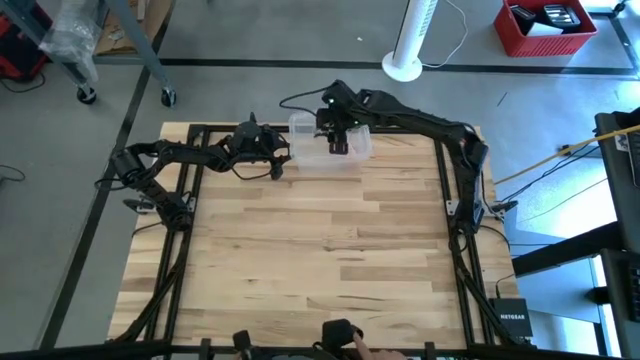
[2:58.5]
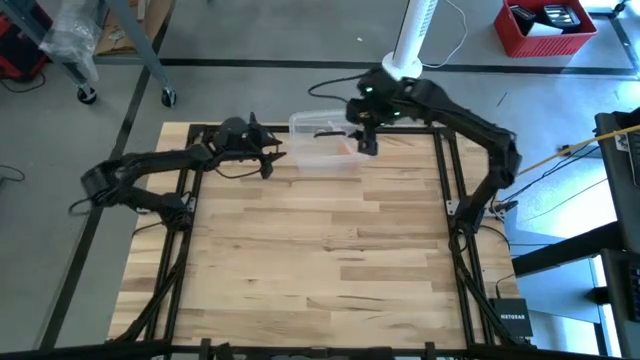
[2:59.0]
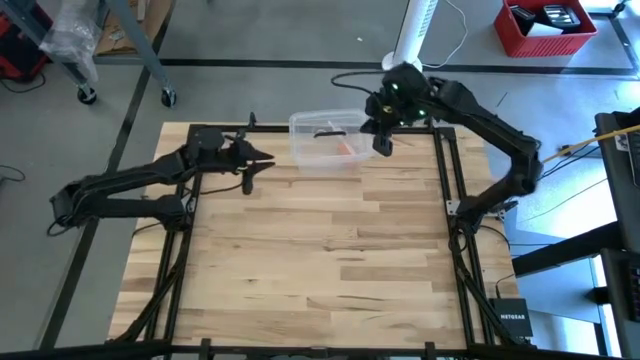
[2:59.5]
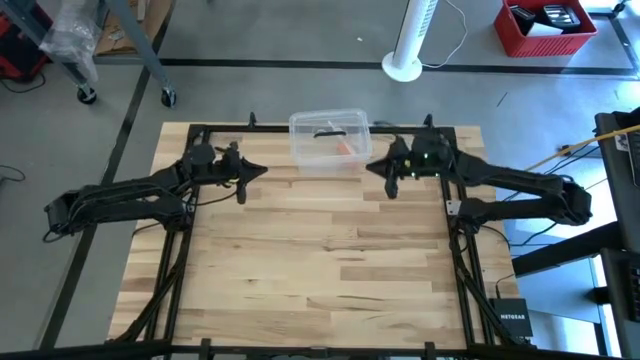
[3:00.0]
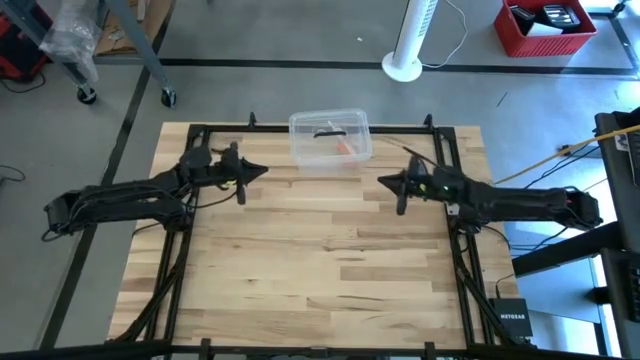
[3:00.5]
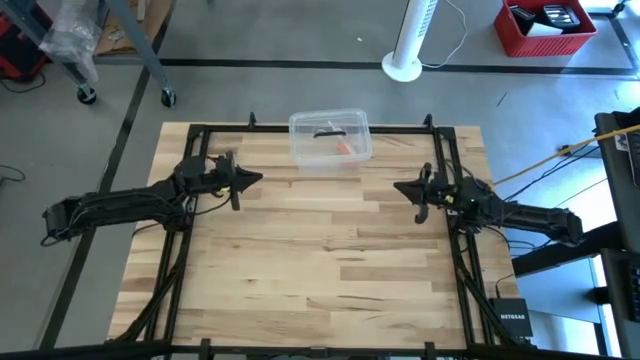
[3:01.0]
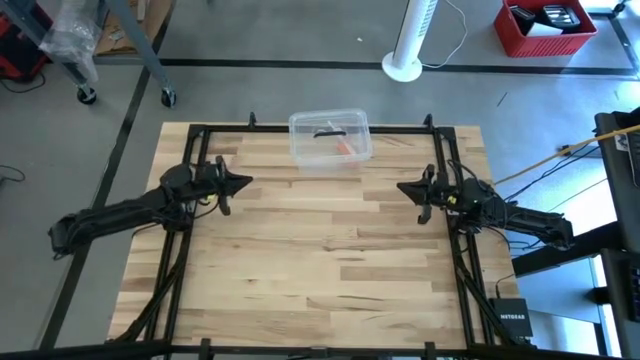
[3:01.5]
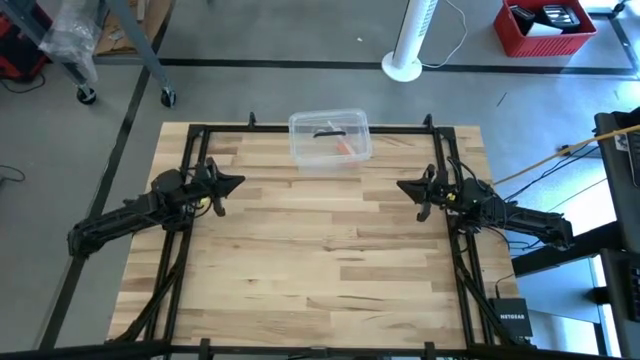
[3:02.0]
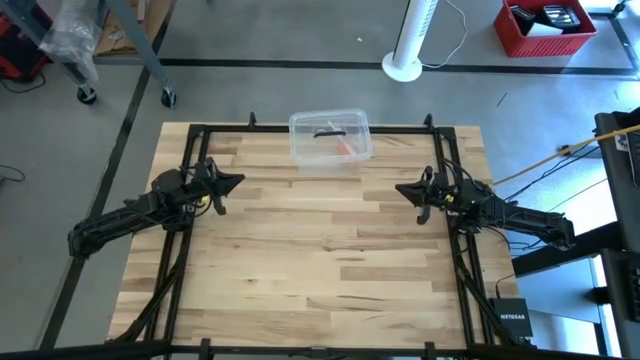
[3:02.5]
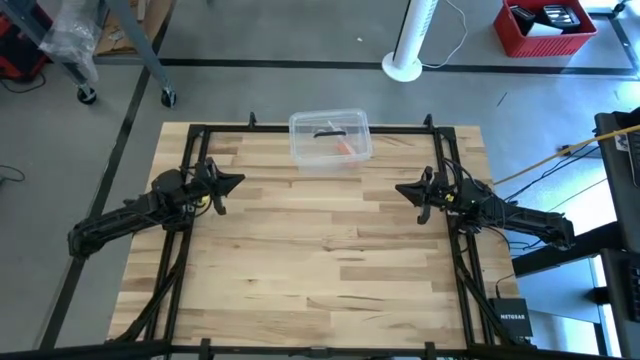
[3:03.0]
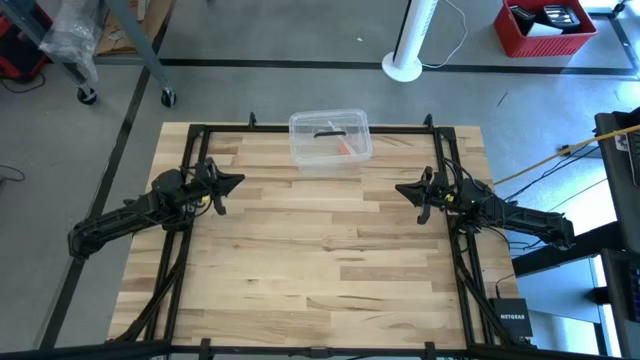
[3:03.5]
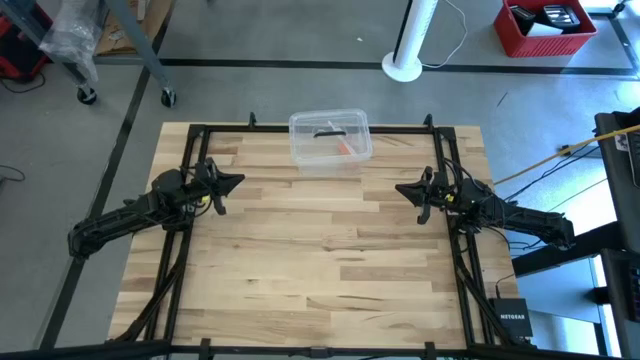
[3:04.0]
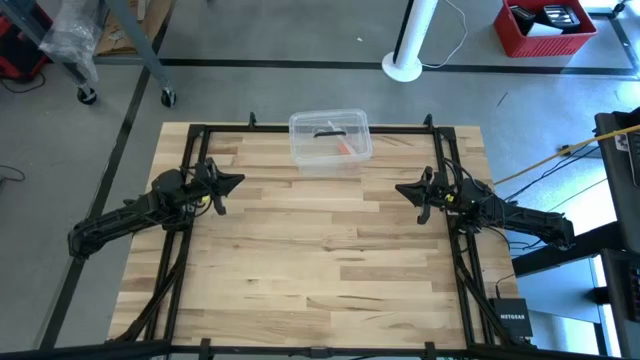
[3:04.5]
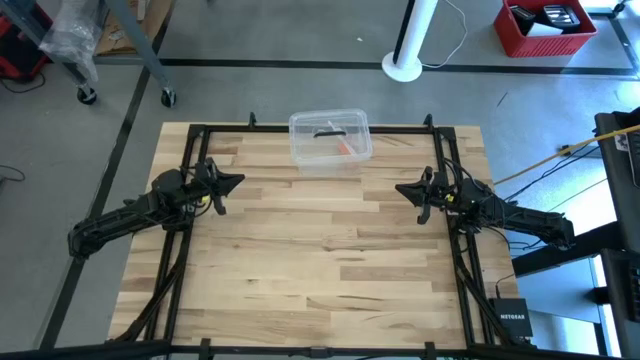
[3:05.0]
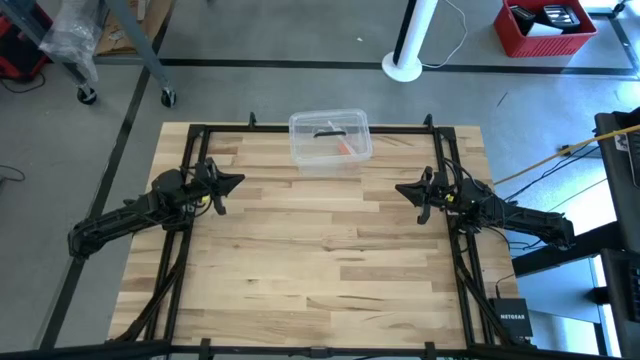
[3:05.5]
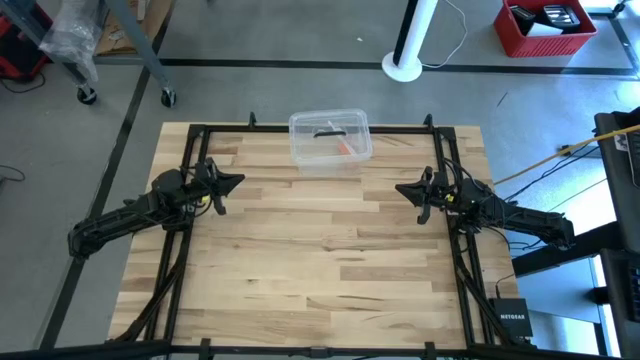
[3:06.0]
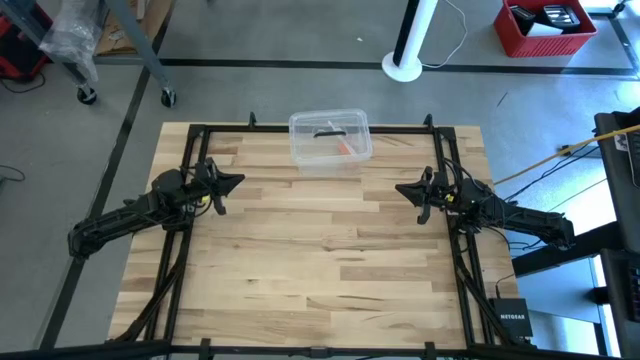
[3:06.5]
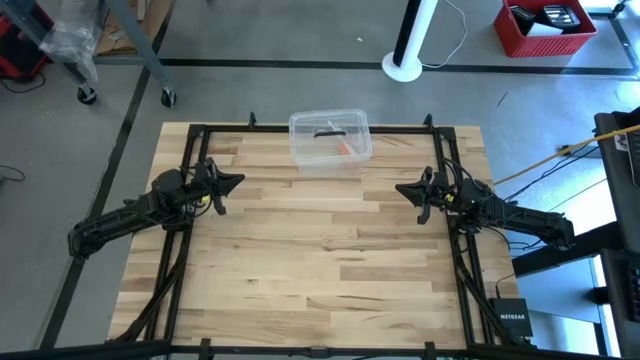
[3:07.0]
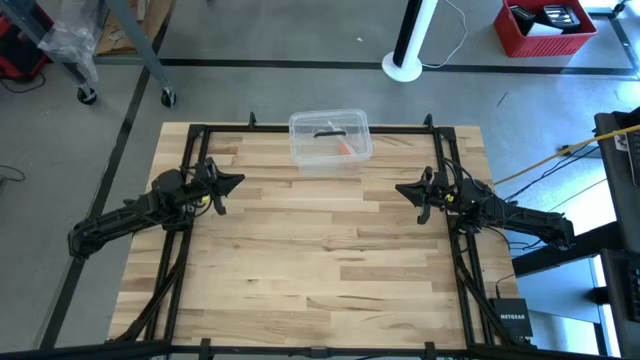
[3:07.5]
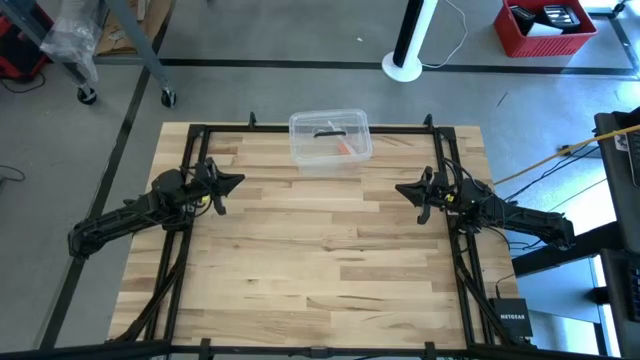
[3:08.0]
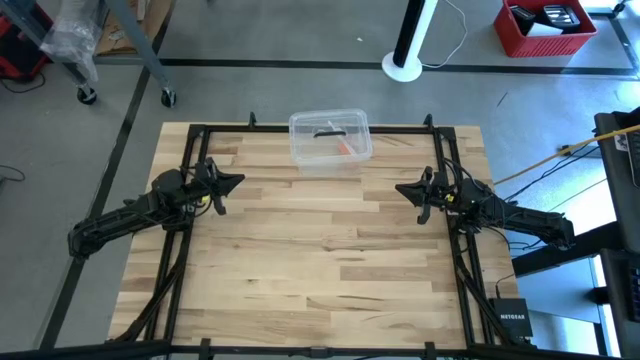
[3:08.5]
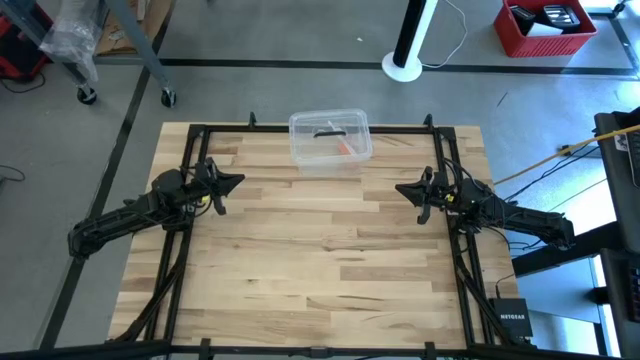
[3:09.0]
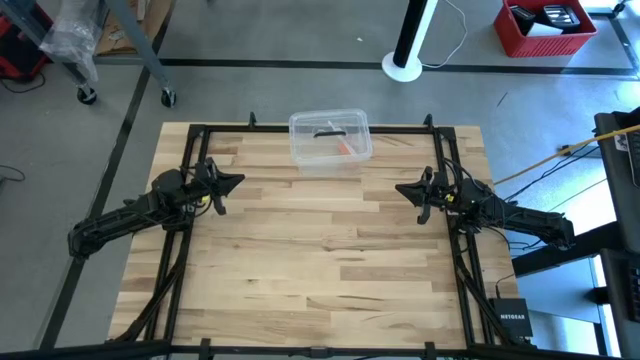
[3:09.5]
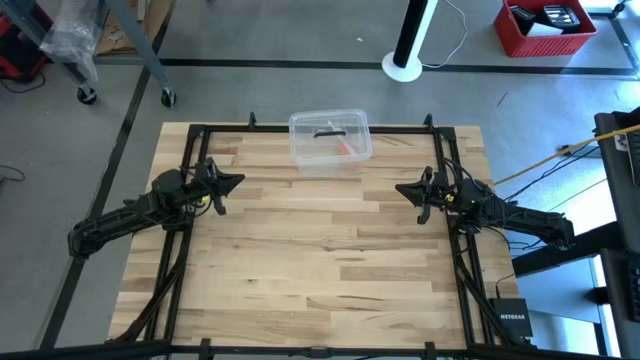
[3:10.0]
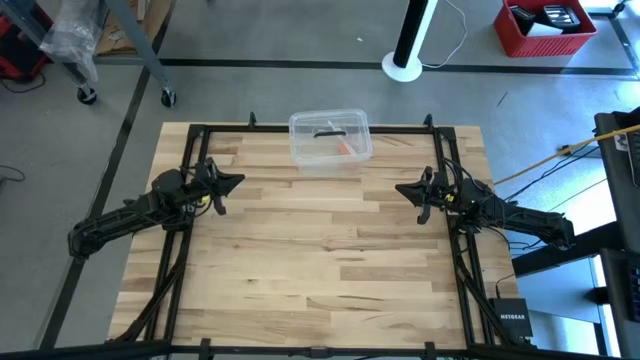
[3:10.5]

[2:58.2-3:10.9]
Task: Roll bandage
Return to Home Position

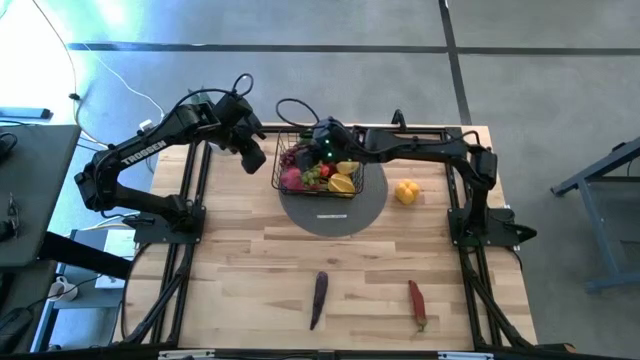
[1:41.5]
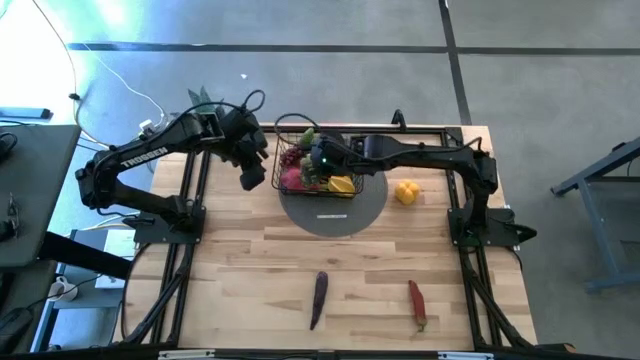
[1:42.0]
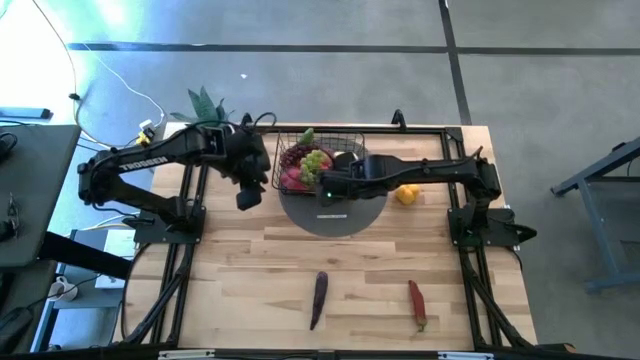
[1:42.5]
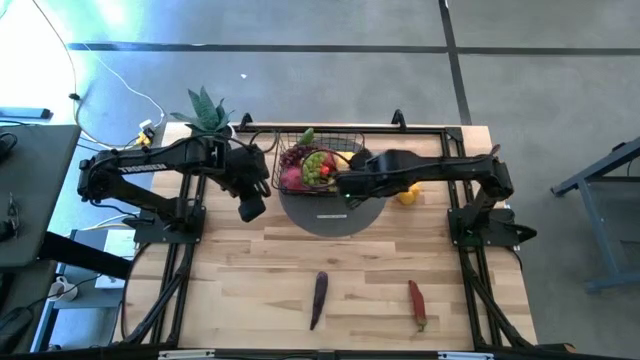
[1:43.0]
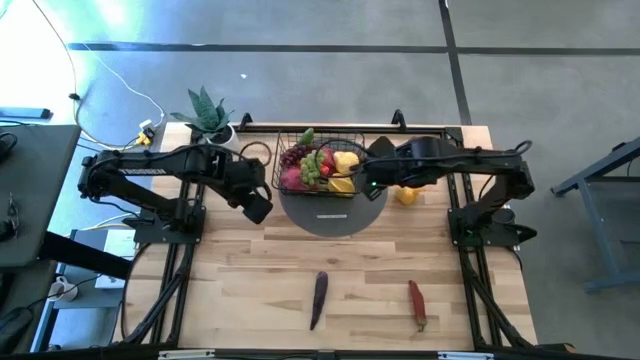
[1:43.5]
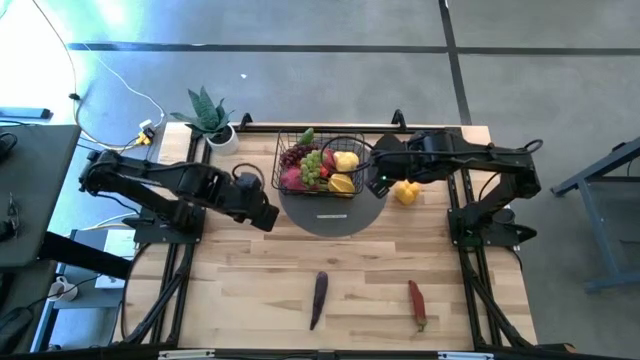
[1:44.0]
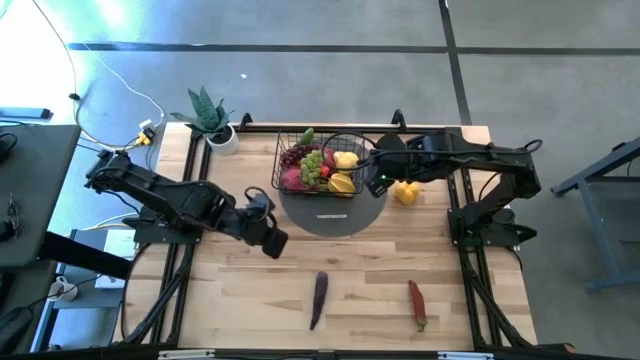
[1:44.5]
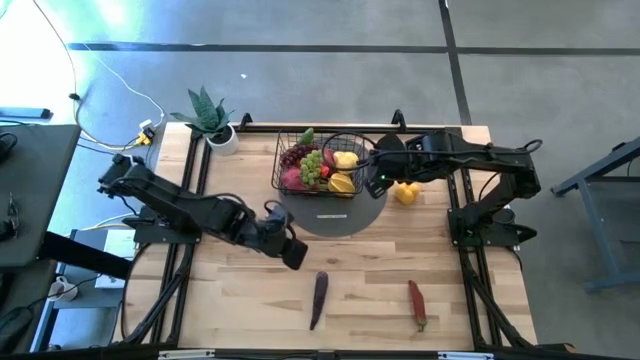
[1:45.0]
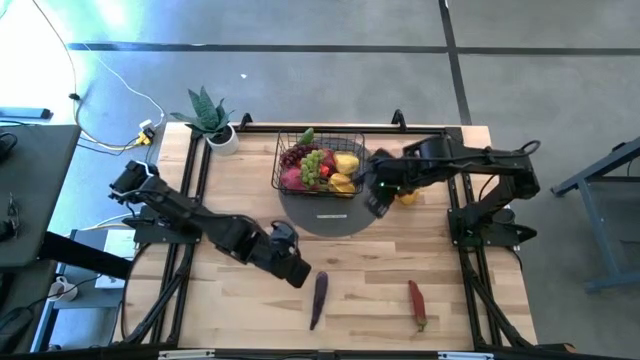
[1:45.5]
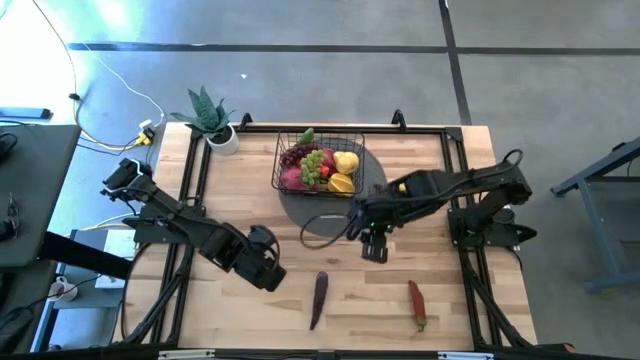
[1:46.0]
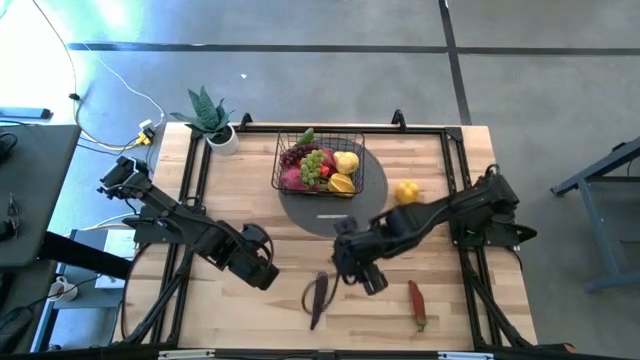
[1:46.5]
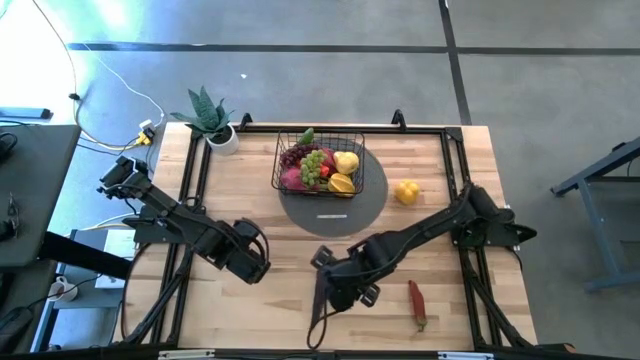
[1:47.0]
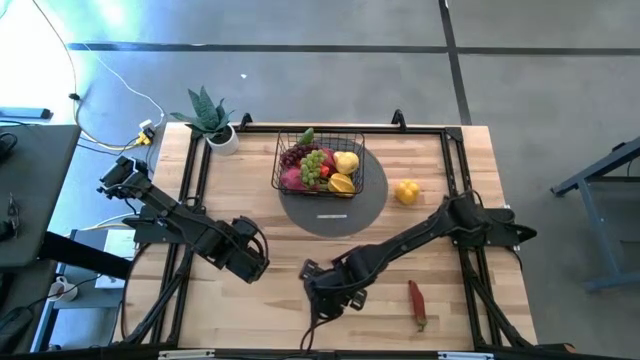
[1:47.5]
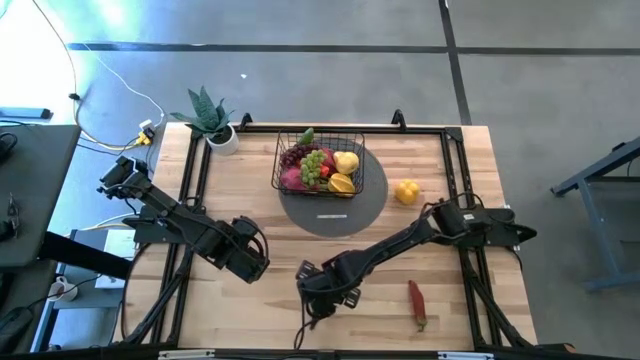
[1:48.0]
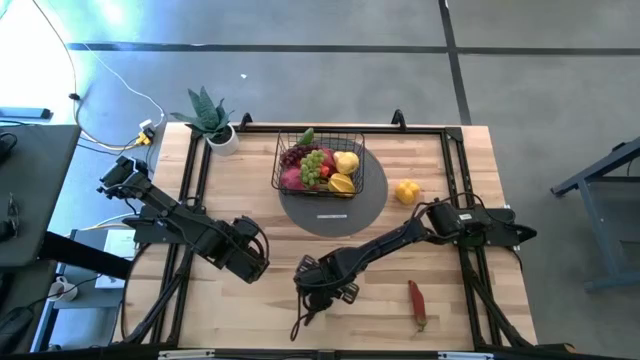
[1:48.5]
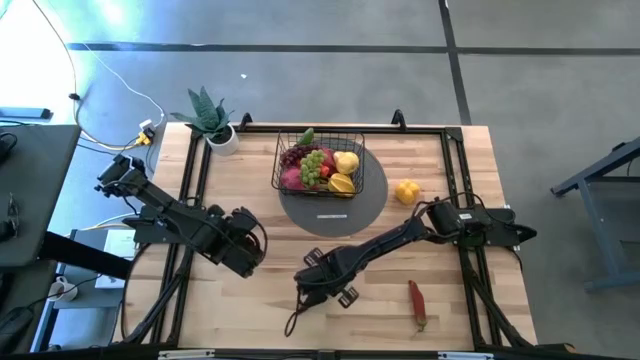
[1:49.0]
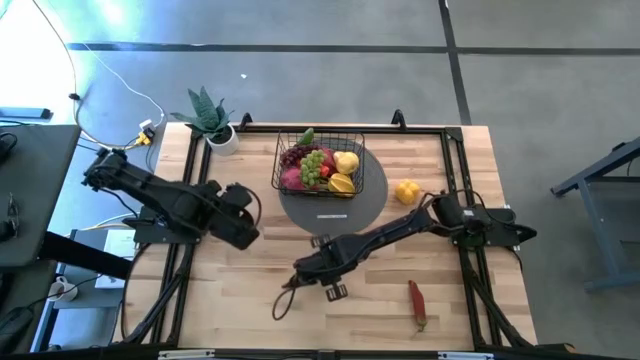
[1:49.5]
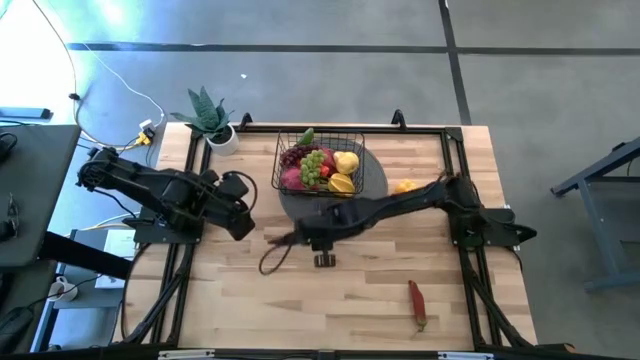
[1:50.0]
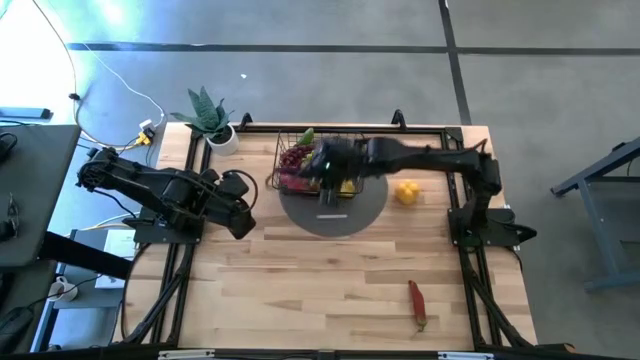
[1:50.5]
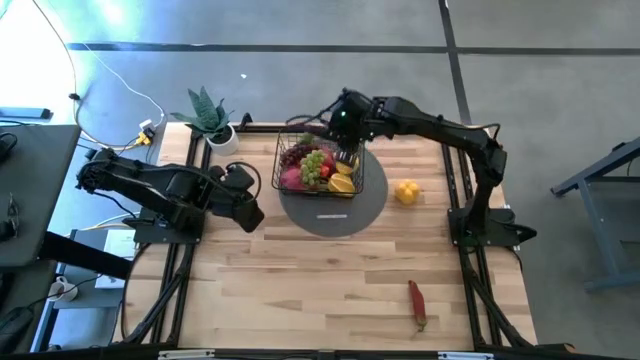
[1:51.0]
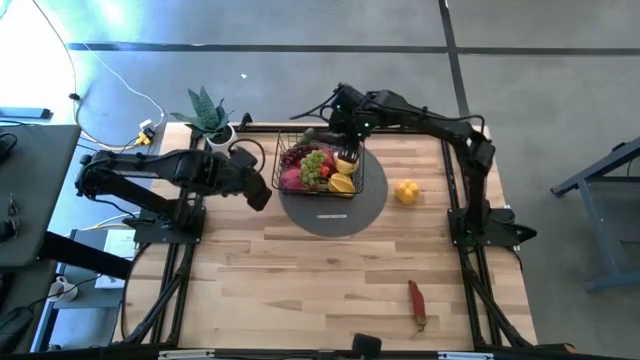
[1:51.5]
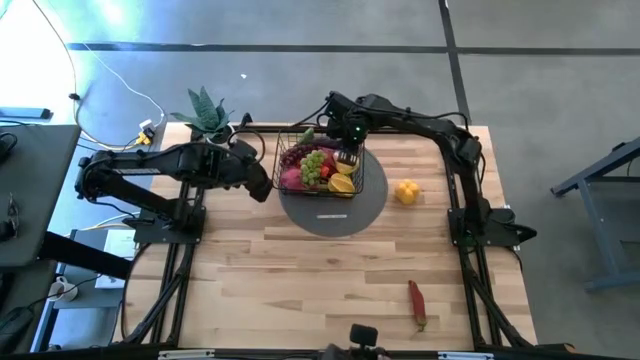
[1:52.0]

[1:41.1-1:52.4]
Task: Build produce basket
Put the purple eggplant into the black wire basket
